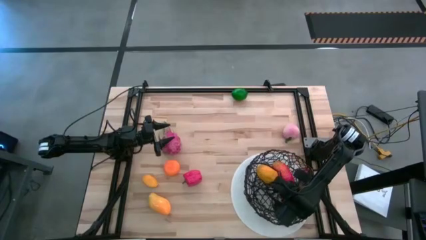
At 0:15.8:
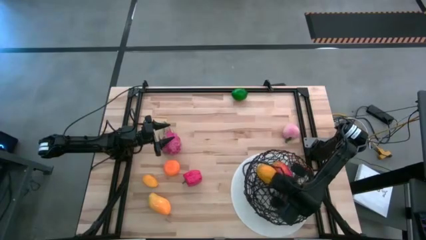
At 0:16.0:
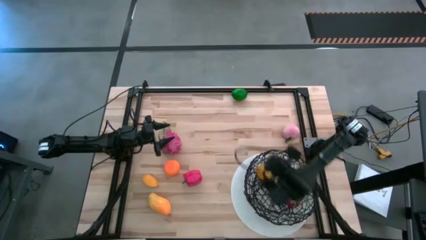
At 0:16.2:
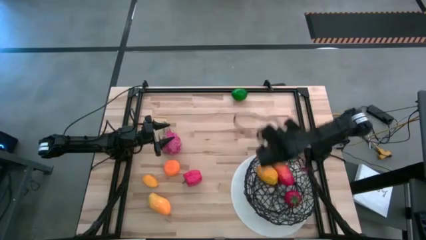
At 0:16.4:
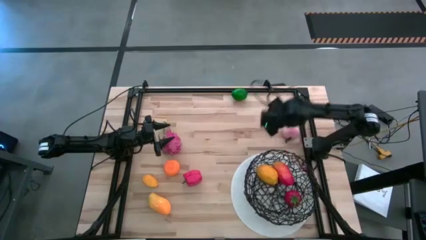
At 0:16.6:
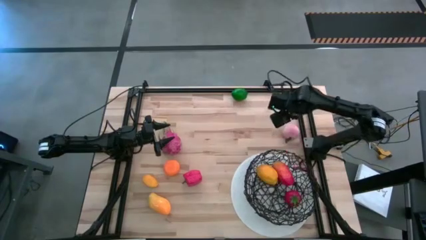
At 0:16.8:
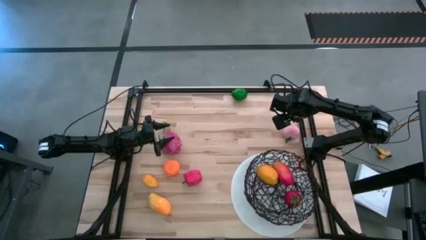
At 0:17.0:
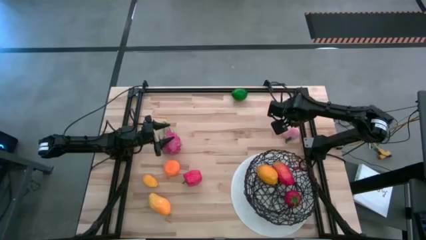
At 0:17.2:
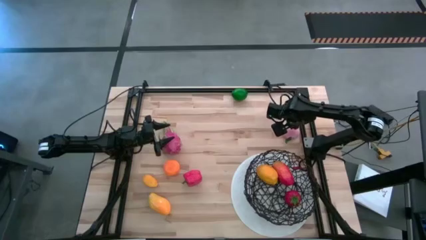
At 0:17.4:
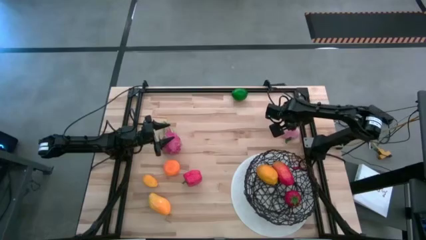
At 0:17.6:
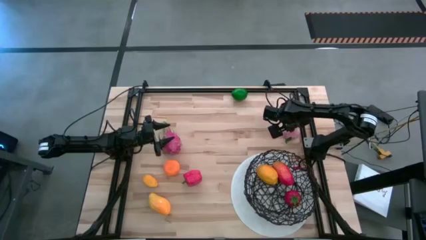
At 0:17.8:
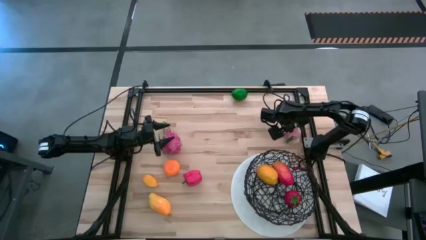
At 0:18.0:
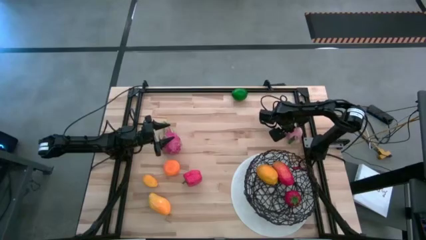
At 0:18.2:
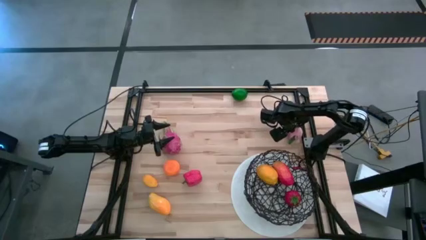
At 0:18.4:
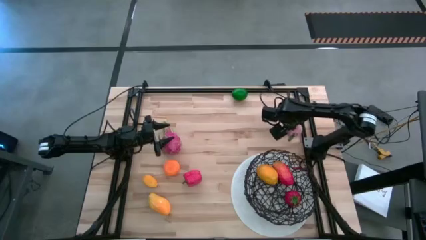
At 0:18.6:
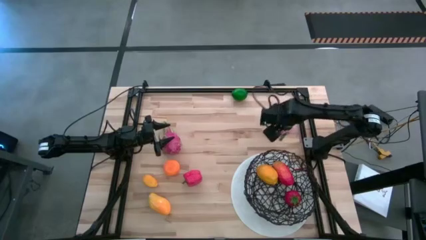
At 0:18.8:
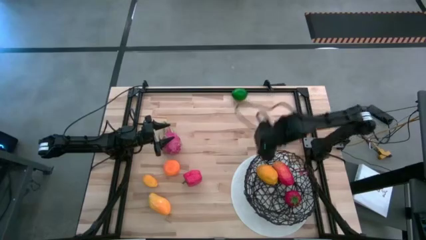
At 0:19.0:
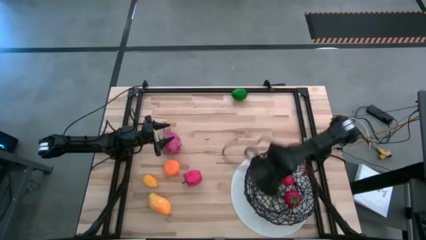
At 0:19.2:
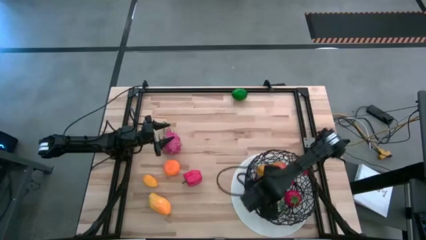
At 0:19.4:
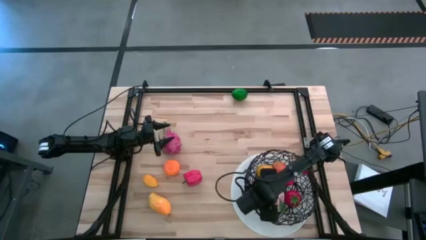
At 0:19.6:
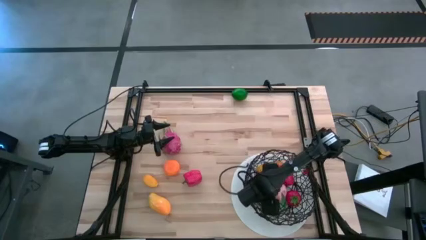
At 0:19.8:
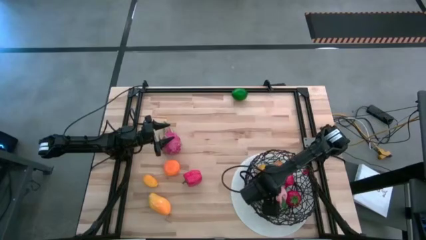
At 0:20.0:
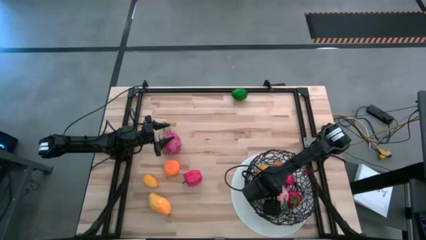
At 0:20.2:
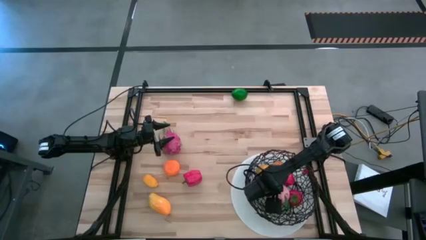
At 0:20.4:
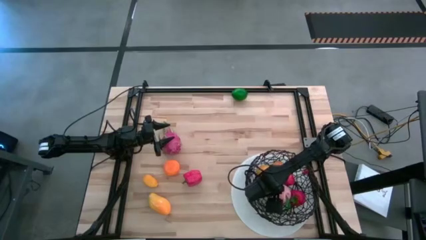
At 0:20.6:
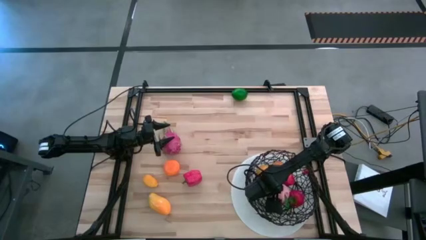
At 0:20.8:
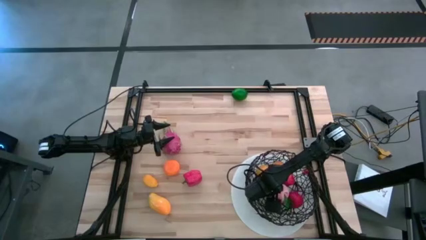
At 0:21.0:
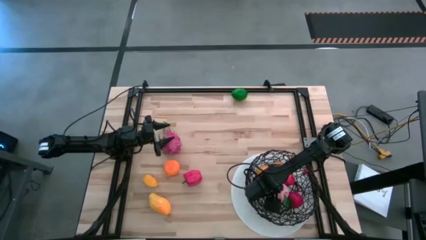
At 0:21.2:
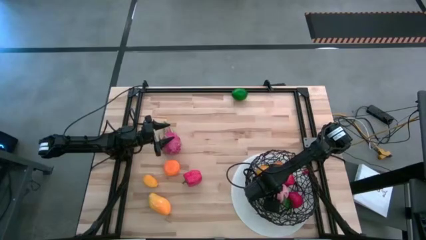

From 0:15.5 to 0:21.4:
Task: Build produce basket
Put the pink peach into the black wire basket

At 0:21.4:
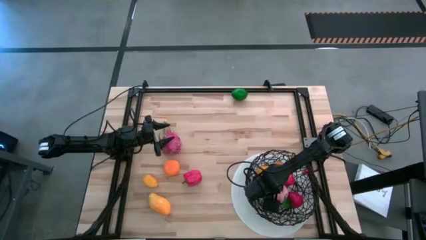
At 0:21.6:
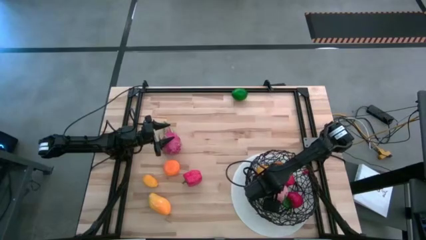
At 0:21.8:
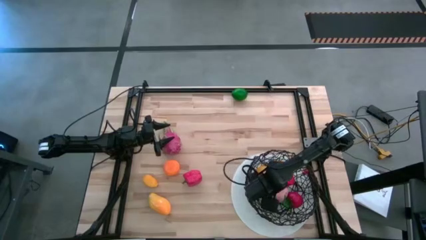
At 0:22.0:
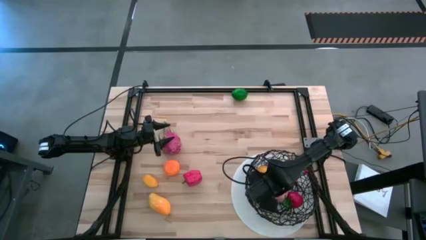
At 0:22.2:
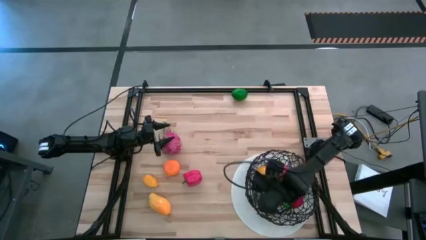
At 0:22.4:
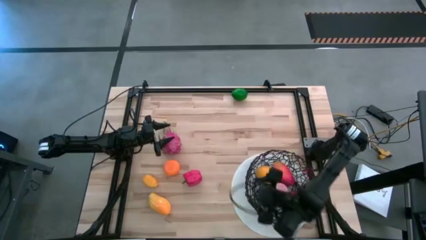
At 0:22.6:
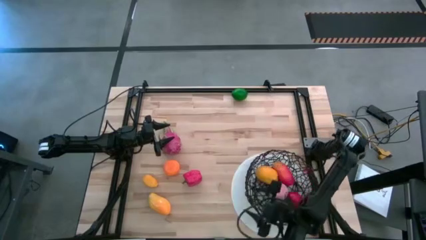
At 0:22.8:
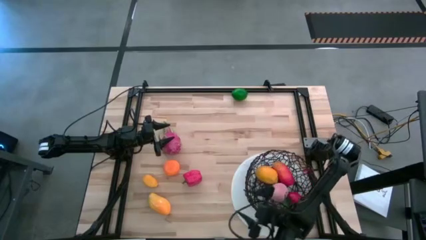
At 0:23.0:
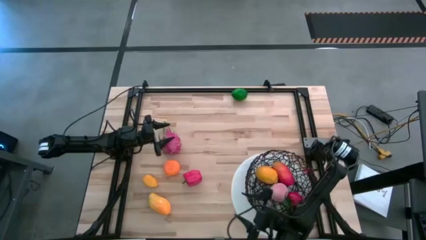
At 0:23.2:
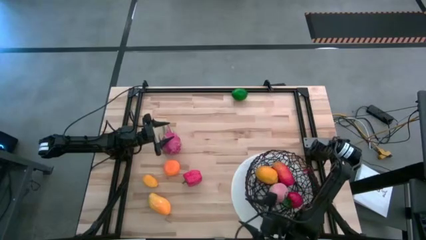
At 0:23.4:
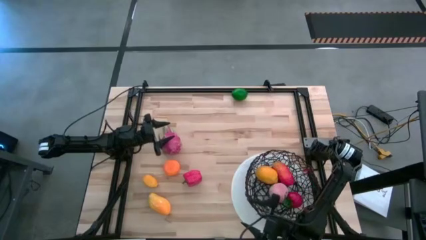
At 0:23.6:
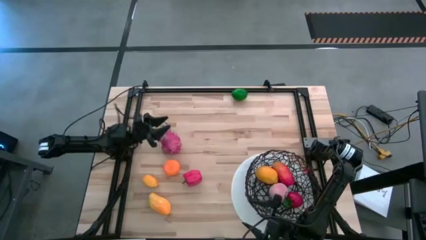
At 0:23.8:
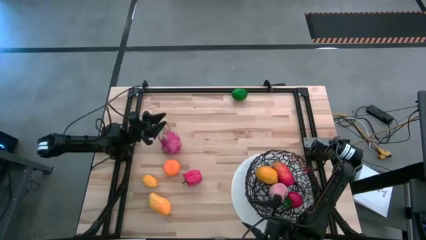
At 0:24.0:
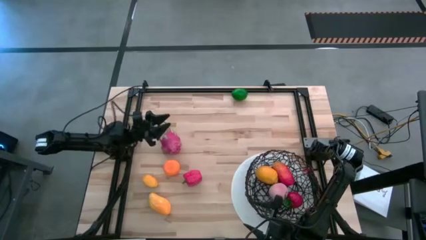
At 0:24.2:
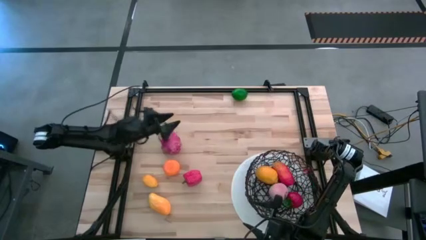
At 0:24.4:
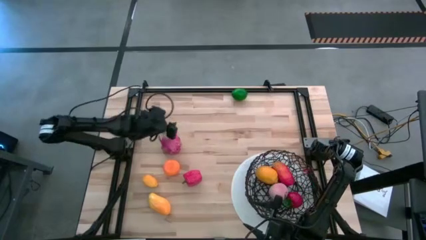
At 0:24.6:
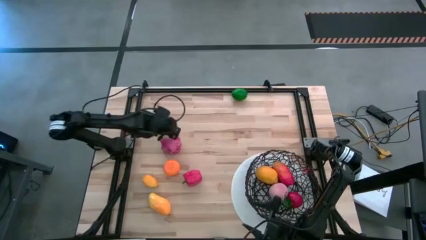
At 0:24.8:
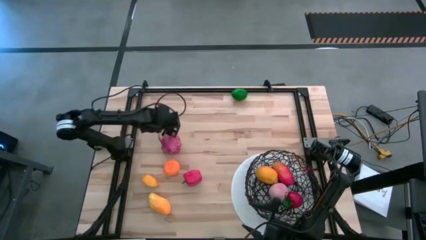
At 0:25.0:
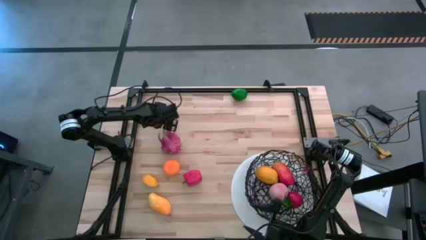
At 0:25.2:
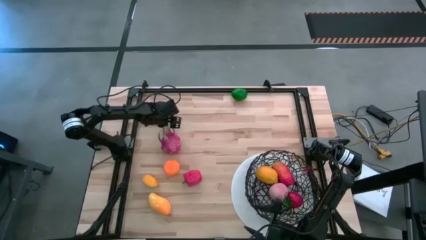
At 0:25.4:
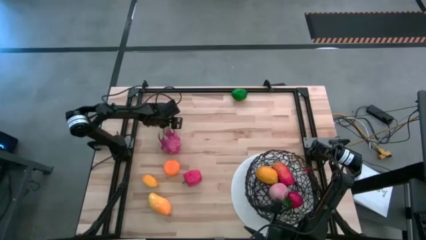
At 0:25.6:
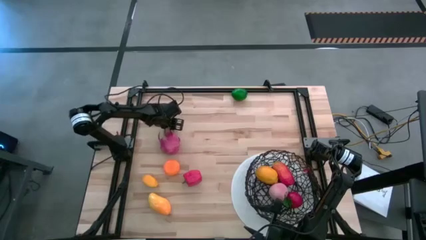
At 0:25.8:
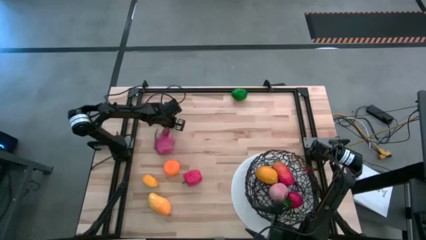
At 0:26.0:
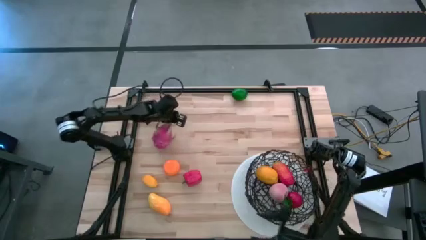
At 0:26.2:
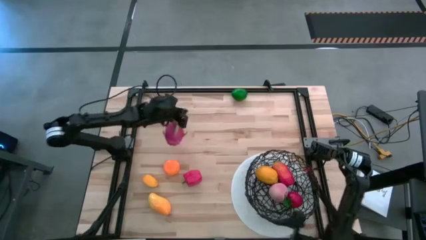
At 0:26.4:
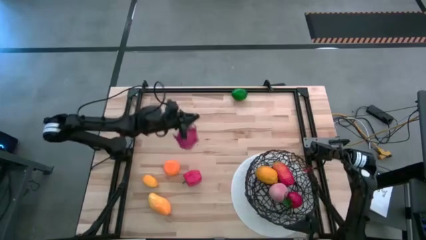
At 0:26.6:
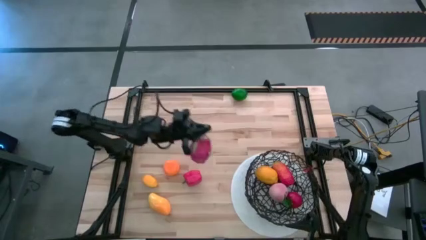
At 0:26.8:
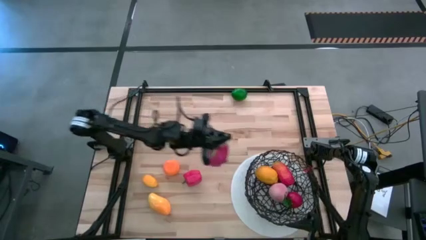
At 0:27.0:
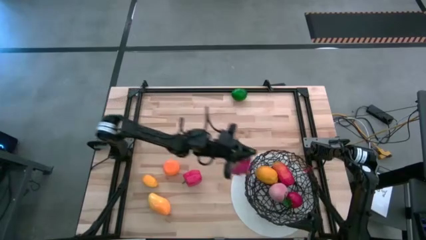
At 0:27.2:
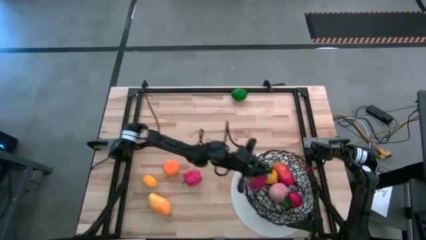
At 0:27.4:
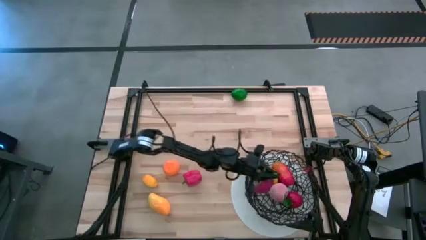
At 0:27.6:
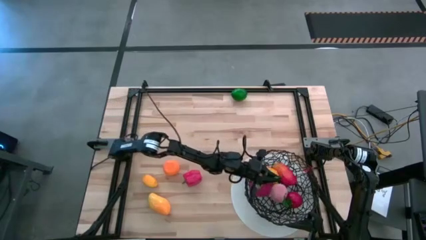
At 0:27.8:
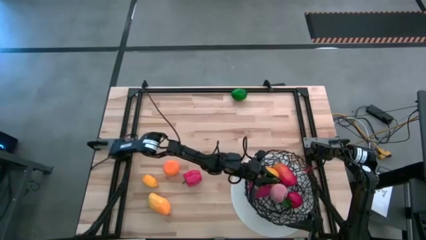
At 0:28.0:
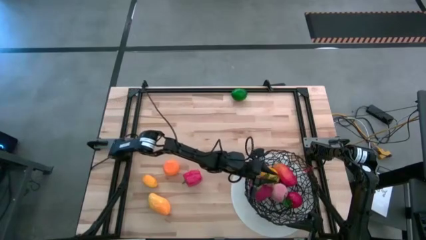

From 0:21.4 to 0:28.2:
Put the pink dragon fruit into the black wire basket

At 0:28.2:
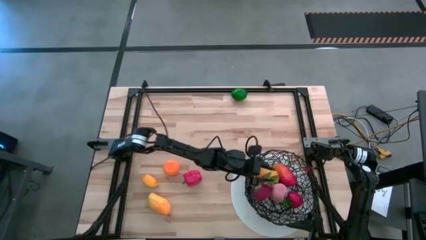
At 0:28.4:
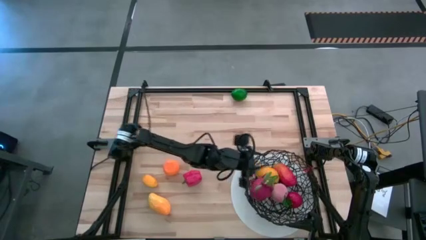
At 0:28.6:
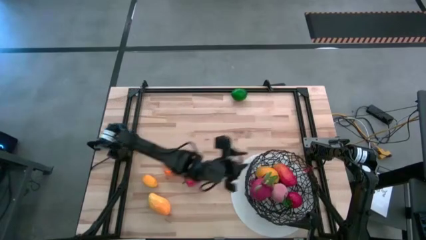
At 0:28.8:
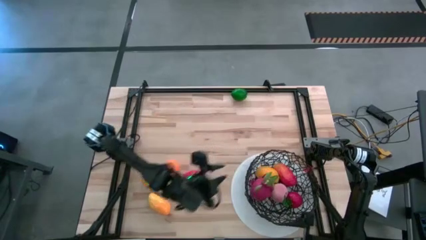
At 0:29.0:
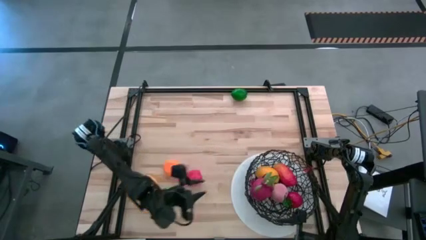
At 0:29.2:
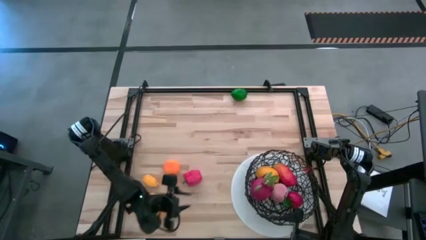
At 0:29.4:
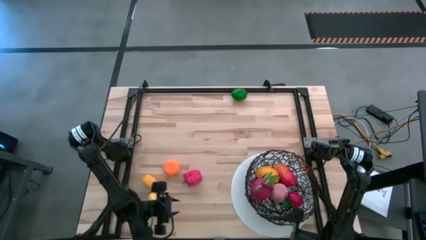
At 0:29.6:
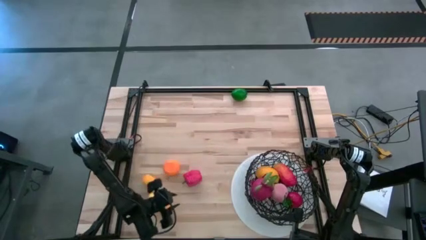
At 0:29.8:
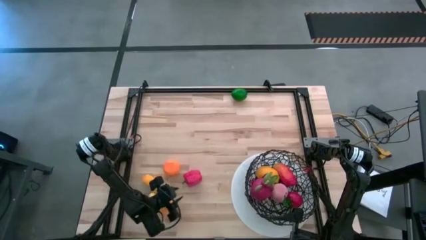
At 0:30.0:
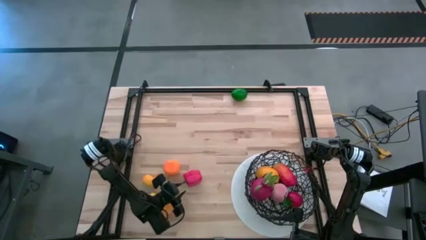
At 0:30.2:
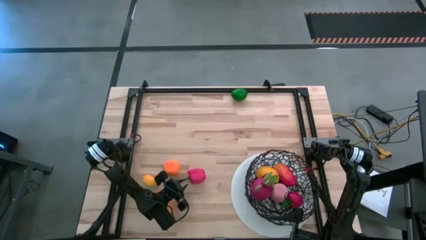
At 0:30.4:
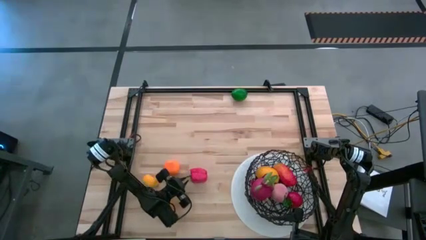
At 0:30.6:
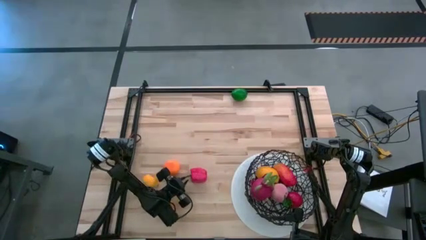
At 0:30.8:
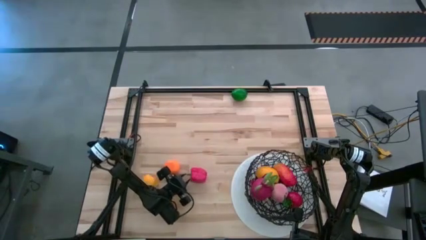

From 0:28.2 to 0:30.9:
Put the red bell pepper into the black wire basket

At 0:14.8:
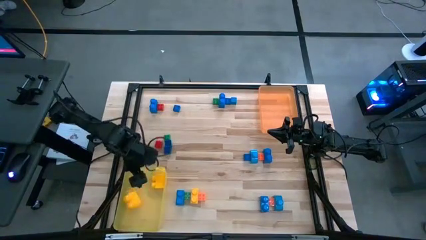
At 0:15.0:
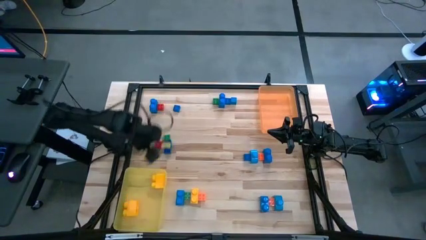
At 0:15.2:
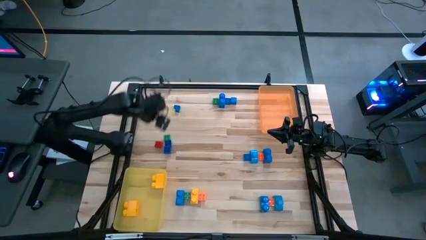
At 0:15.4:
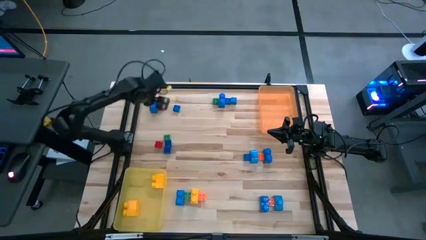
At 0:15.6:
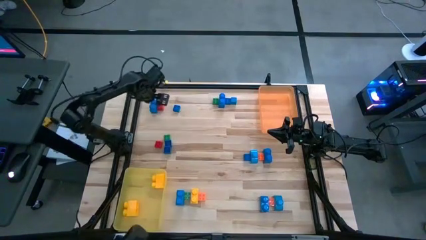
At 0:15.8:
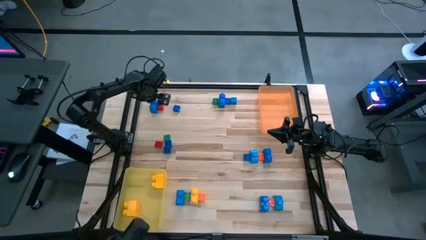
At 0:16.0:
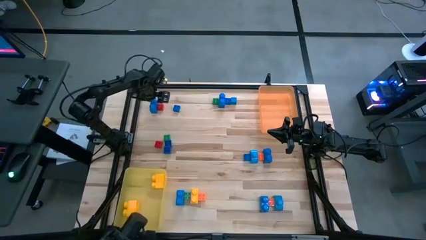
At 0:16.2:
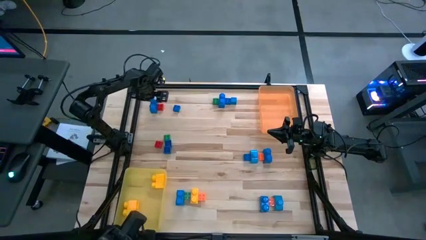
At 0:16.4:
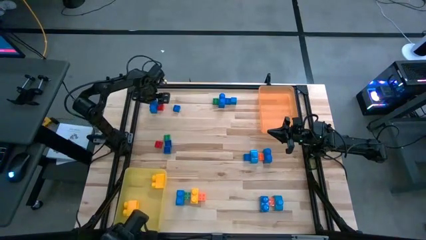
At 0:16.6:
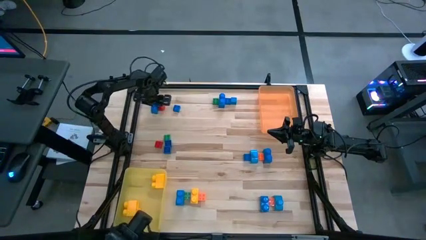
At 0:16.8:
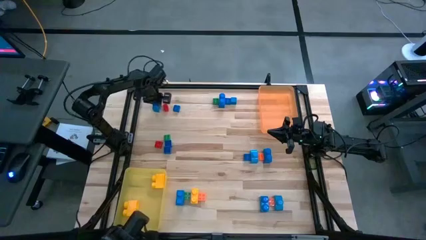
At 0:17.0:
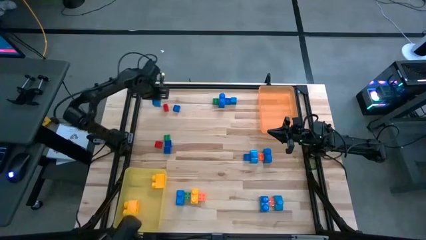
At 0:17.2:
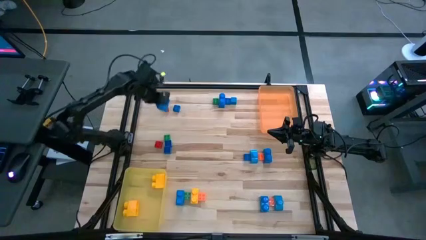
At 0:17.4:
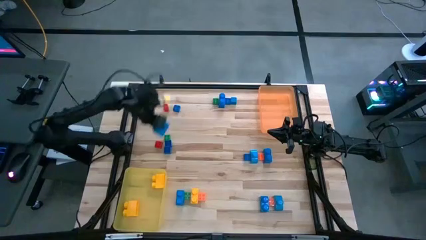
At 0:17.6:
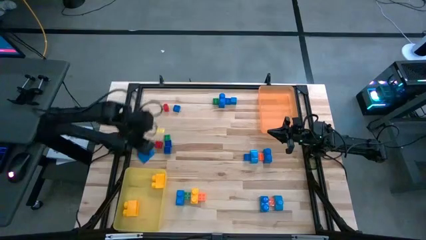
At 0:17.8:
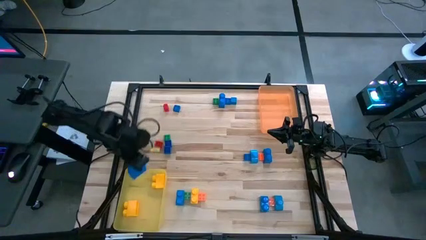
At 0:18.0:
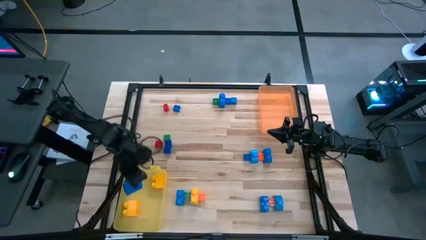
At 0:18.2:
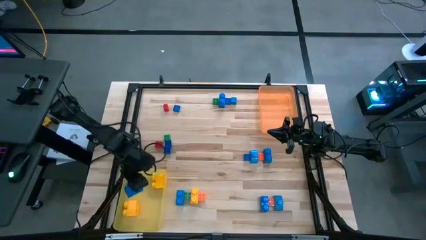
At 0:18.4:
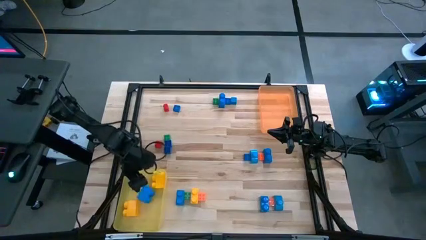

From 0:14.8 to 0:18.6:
Task: Sort blocks by size
Put the large blue game piece into the yellow bin
